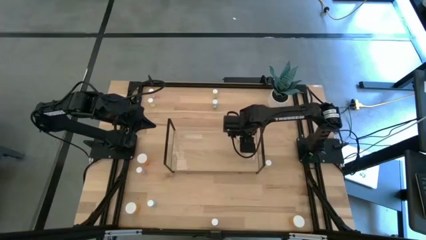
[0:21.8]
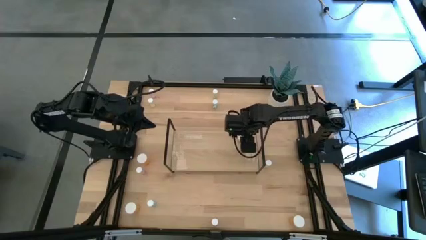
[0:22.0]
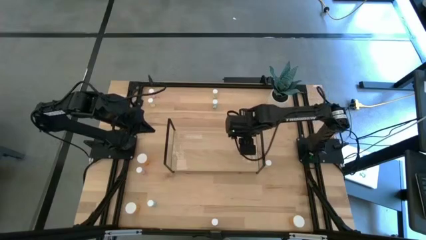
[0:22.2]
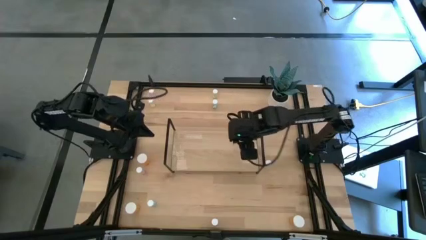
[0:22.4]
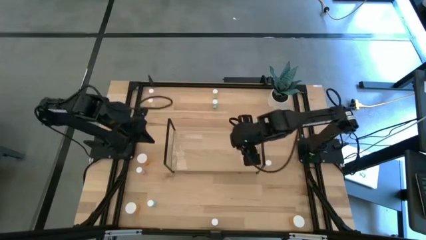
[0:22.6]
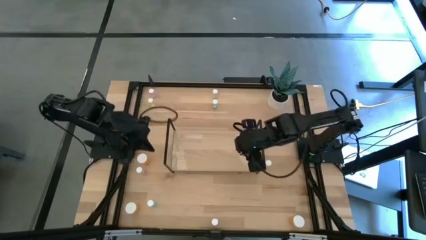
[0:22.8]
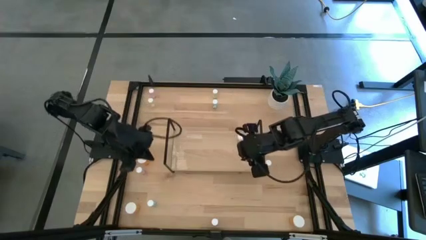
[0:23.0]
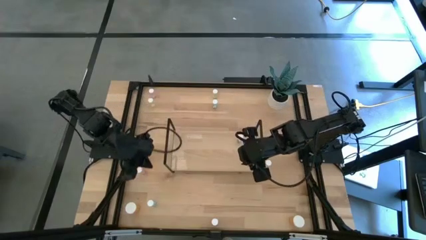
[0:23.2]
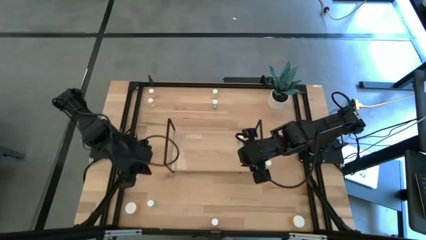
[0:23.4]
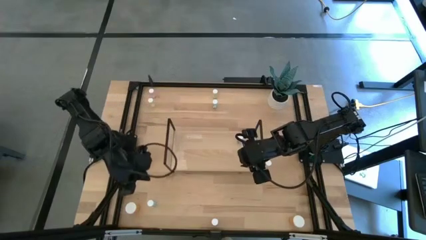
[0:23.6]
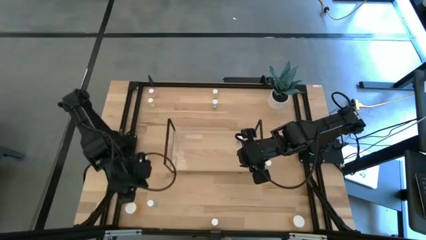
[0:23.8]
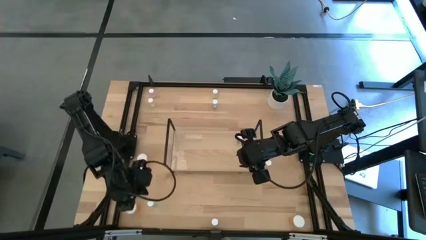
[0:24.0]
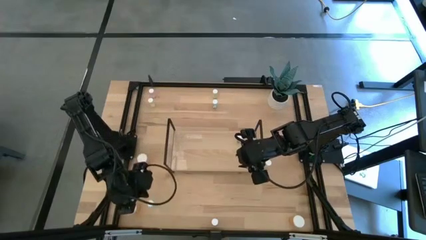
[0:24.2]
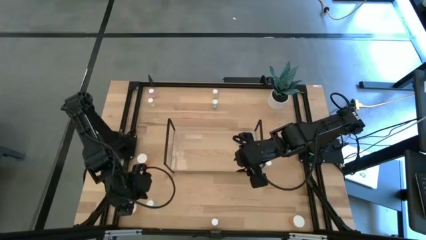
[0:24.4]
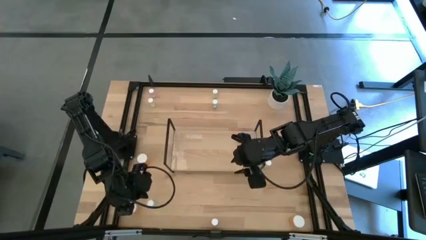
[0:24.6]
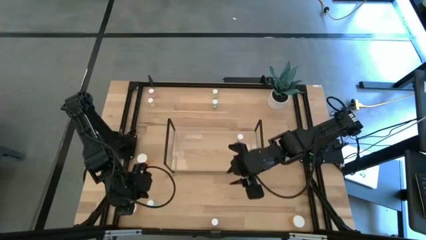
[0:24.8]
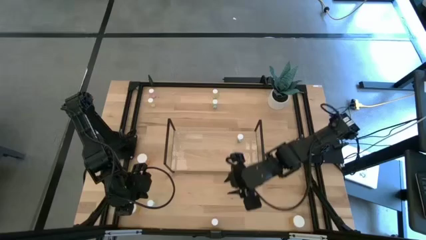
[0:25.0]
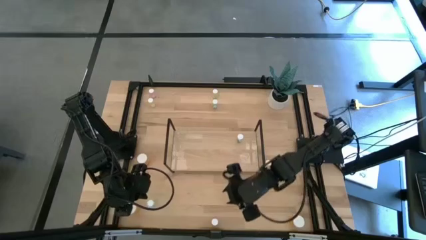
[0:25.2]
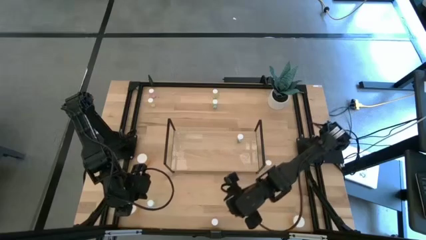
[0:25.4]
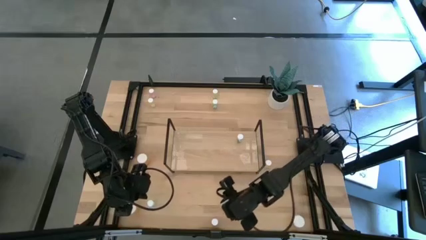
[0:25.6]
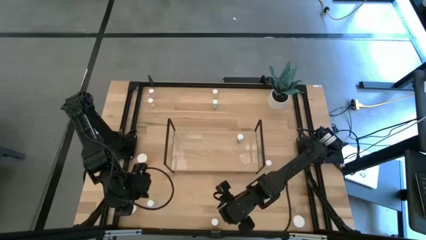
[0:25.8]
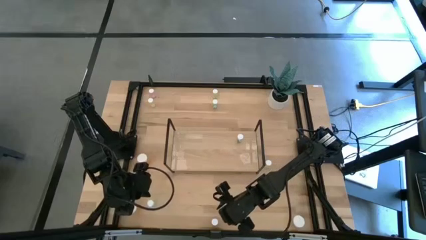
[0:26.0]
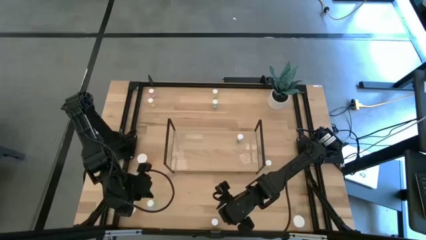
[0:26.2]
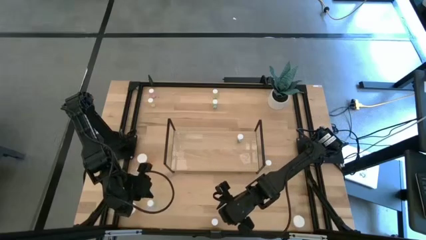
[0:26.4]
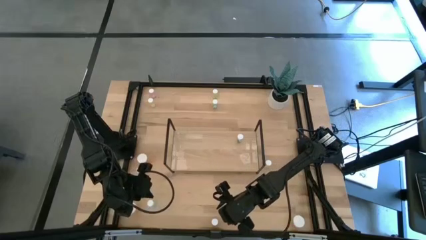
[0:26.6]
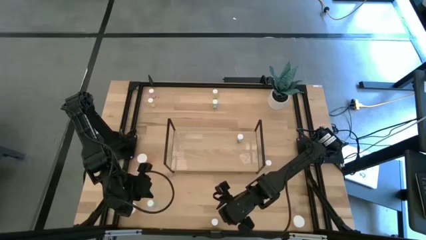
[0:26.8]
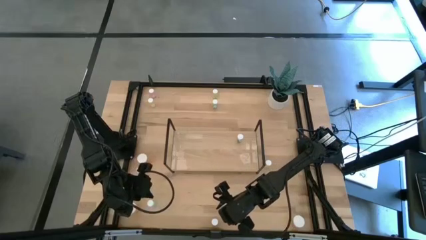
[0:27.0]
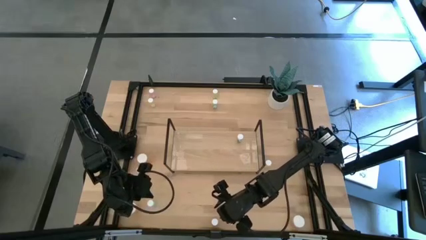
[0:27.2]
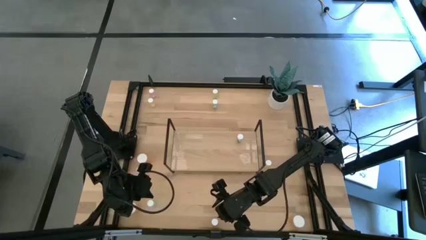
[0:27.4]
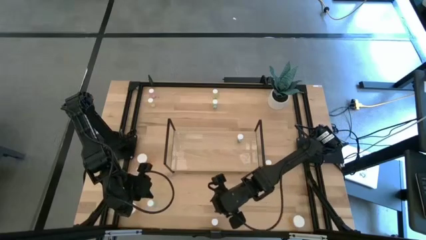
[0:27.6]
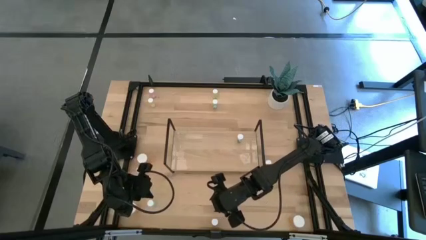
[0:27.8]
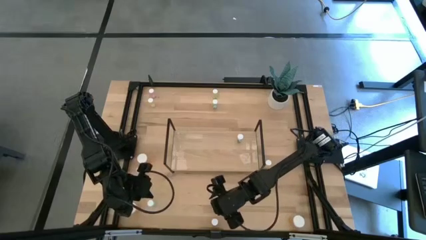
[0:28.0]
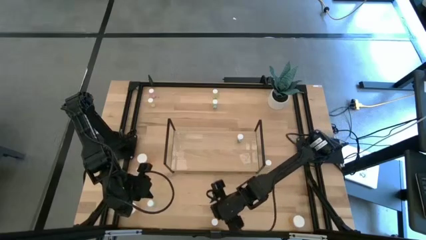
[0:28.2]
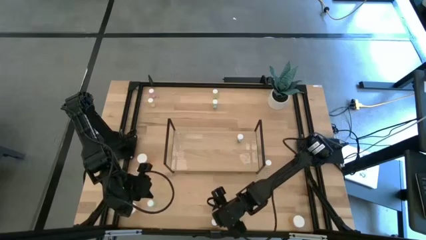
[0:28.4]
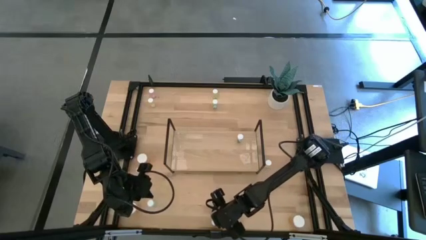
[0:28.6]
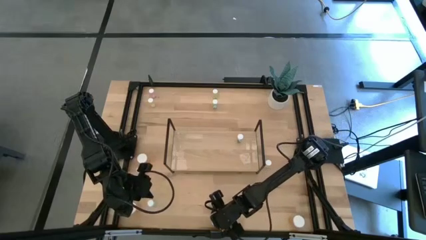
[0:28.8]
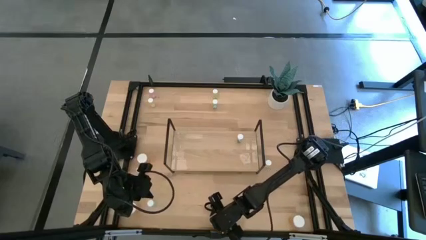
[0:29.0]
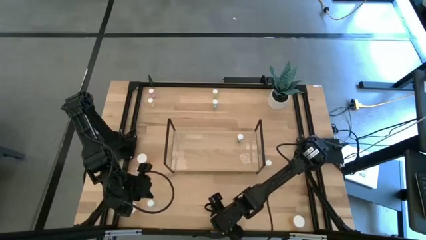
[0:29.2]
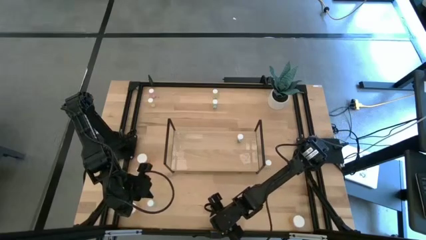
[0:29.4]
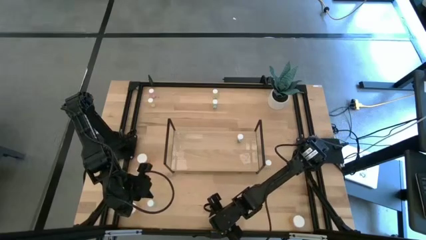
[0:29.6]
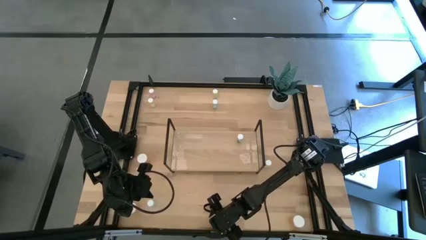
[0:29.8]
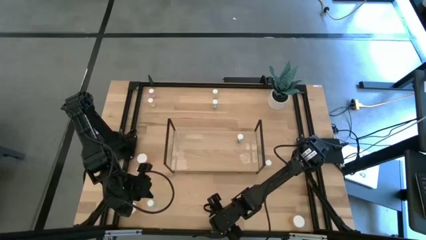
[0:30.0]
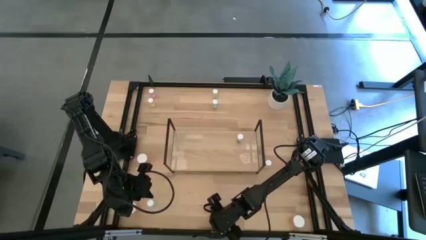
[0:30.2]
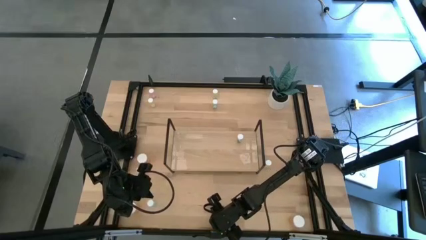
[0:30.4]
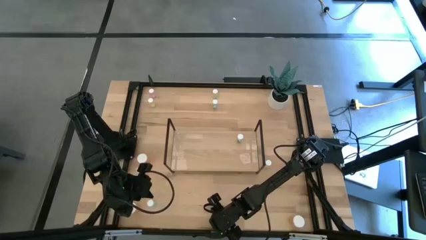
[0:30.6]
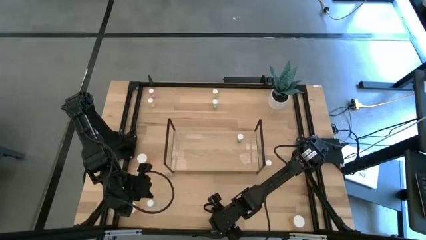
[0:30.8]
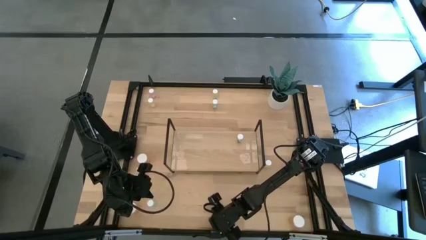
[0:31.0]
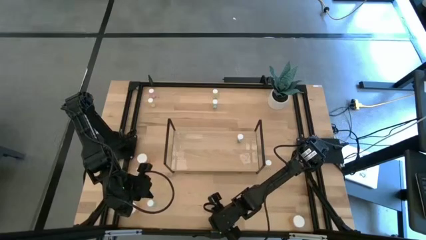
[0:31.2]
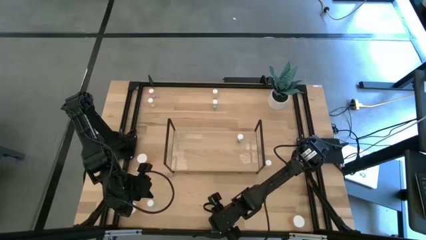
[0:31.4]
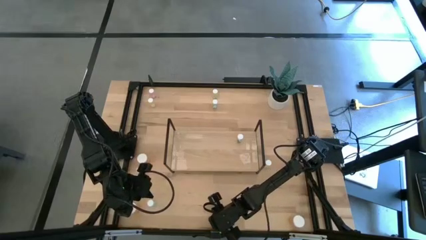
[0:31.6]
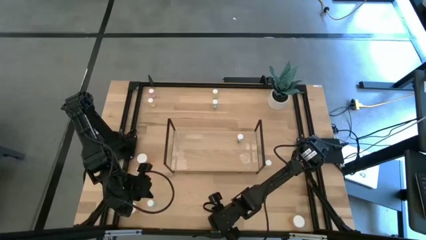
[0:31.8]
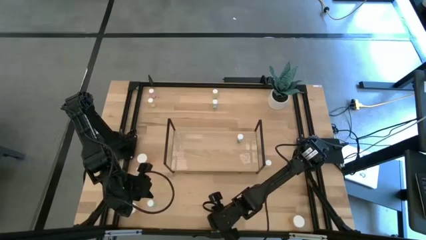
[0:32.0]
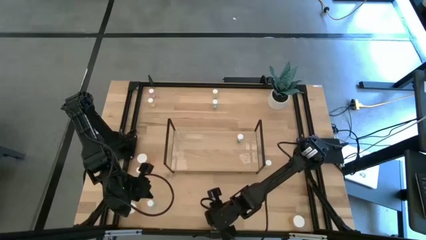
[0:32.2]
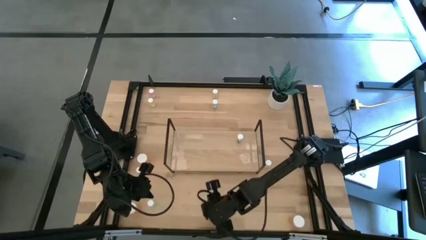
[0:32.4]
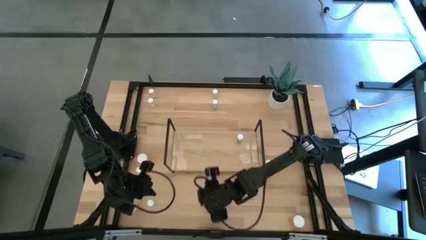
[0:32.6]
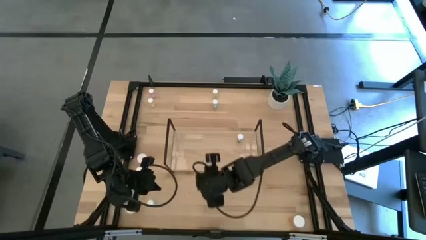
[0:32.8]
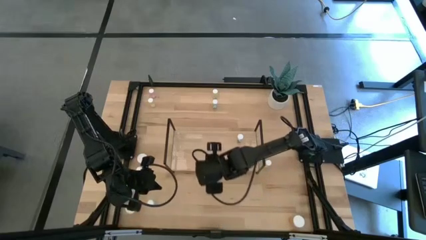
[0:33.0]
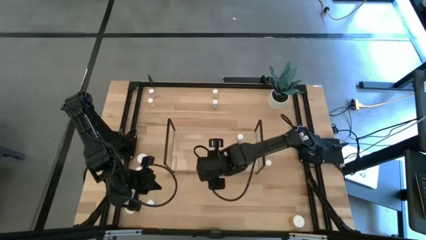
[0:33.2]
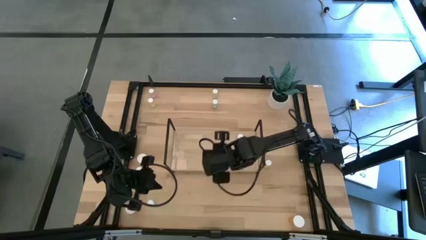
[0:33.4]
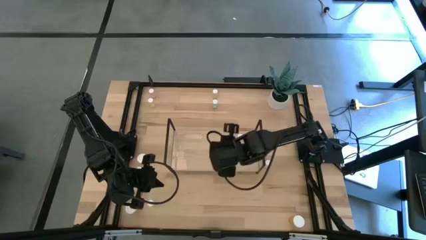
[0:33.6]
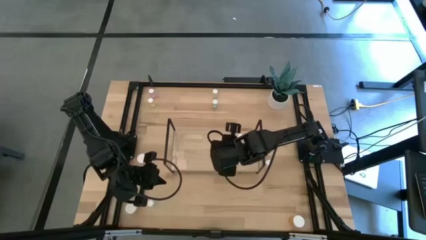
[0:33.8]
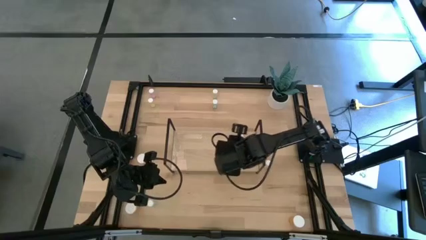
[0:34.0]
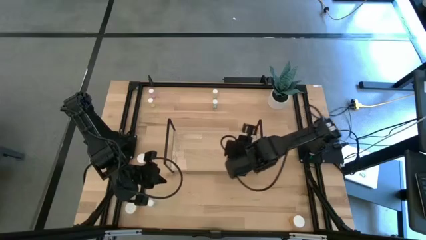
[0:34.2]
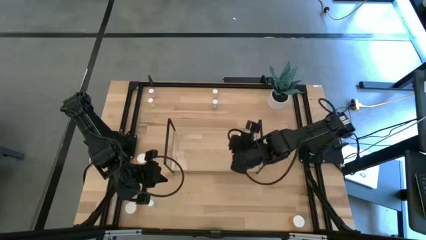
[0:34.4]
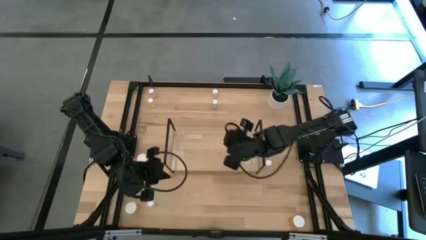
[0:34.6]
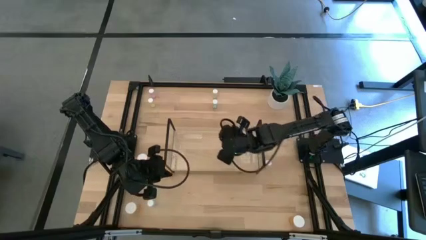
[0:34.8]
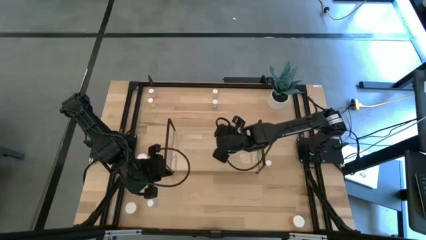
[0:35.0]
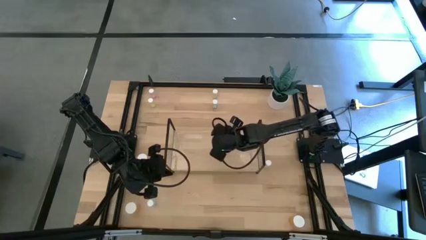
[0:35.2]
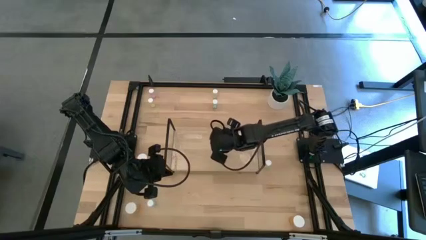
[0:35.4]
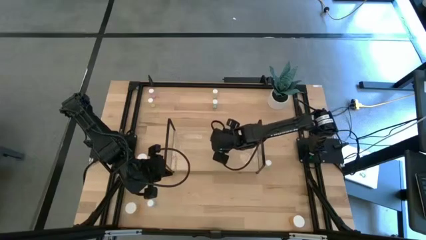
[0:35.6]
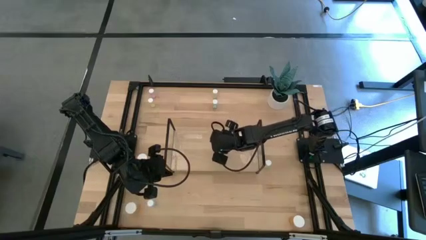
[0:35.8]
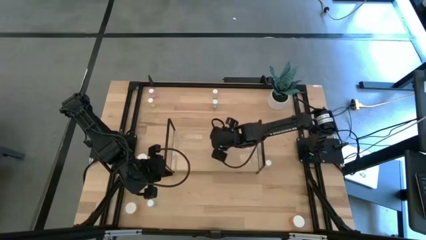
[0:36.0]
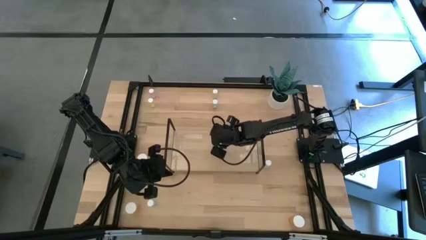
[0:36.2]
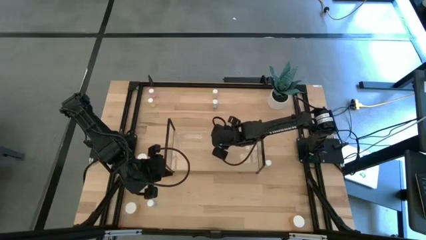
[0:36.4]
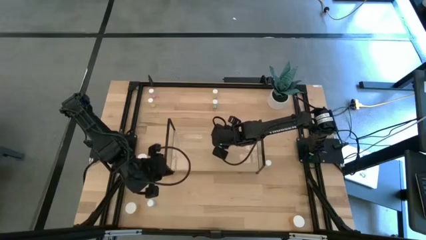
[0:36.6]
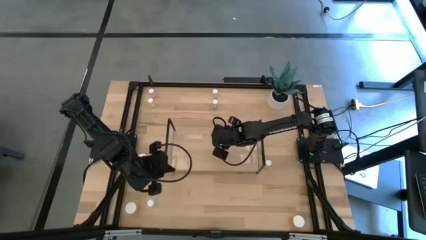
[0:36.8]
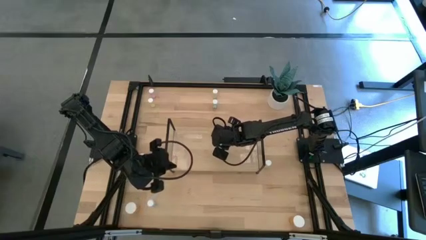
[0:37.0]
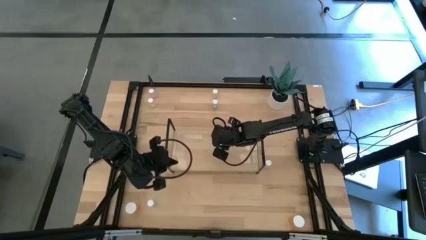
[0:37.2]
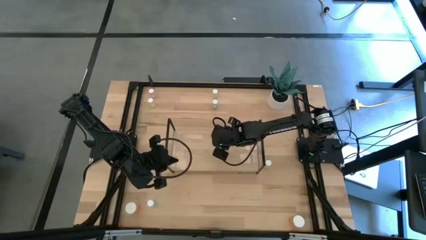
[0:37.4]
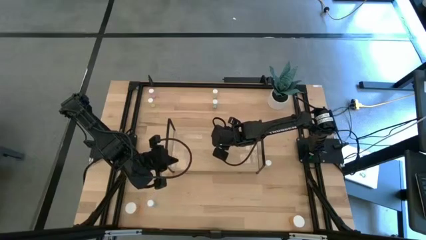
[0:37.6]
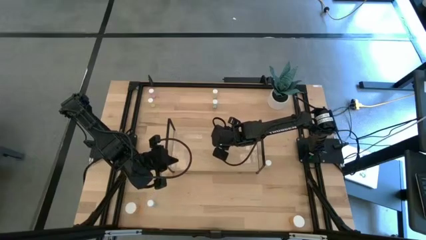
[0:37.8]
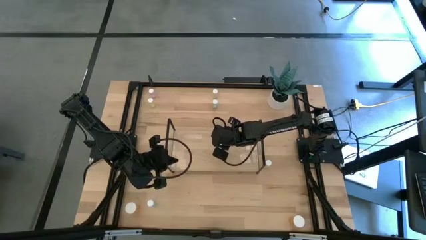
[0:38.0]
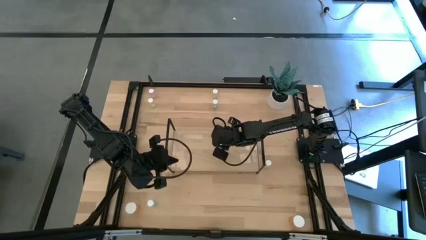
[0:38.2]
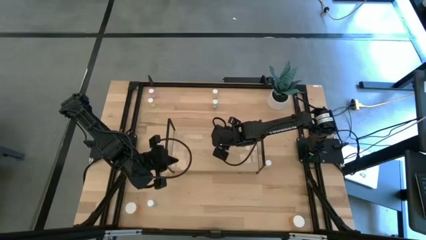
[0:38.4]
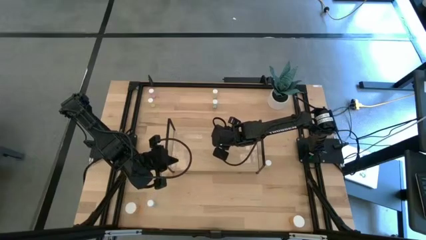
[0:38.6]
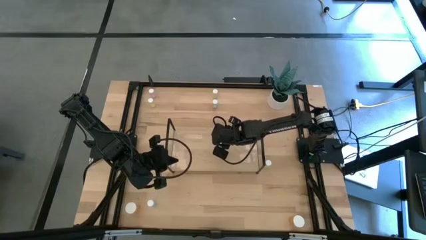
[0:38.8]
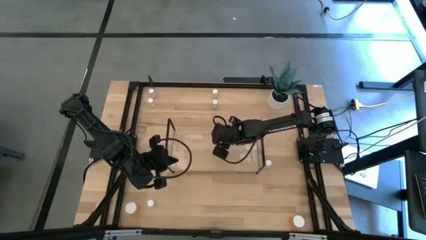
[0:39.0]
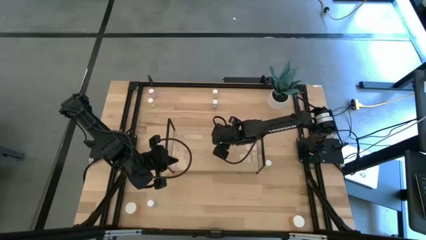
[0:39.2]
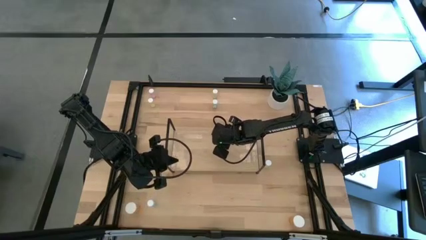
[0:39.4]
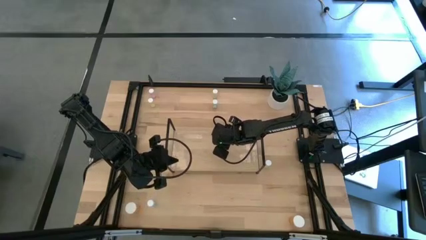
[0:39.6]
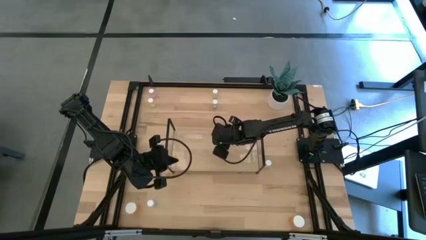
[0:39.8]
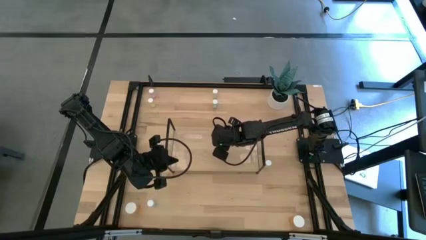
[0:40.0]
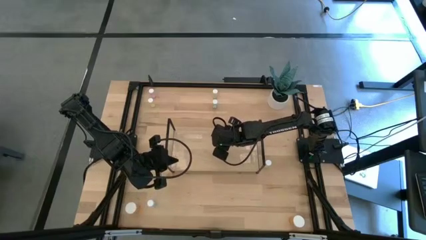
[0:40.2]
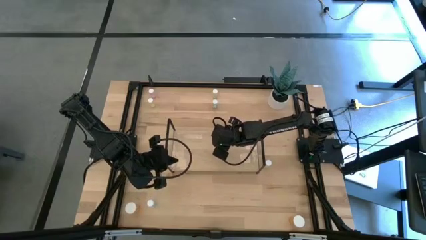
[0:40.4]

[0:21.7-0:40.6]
Task: Pick and place medicine bottles onto shelf by color
Put the bottom pink pill bottle on the shelf
